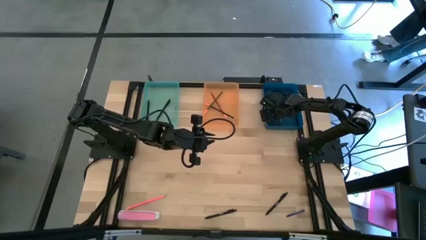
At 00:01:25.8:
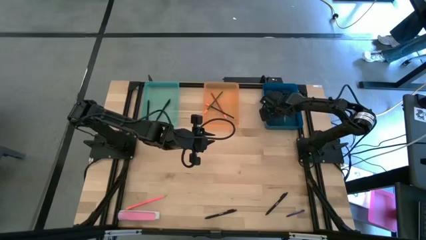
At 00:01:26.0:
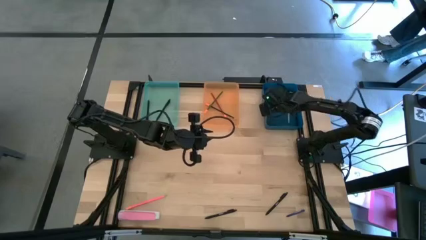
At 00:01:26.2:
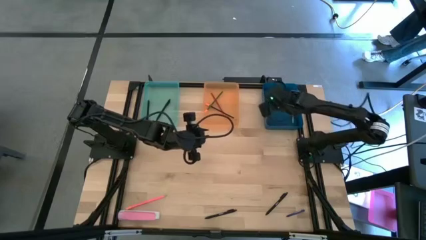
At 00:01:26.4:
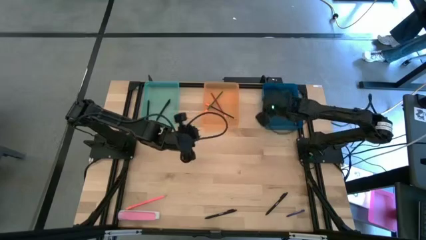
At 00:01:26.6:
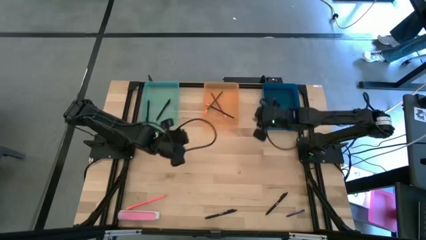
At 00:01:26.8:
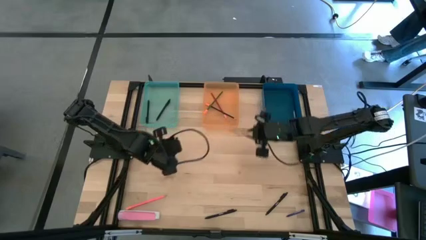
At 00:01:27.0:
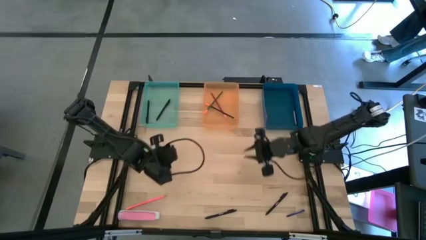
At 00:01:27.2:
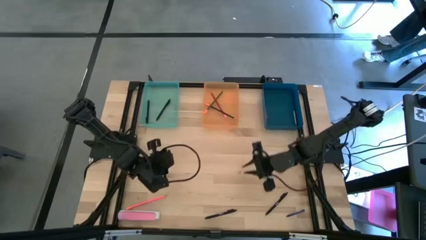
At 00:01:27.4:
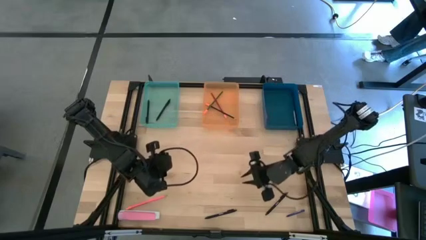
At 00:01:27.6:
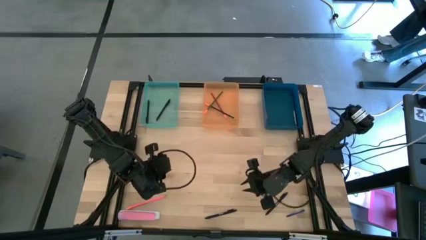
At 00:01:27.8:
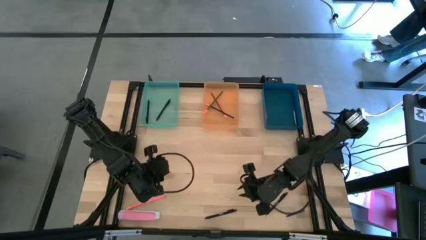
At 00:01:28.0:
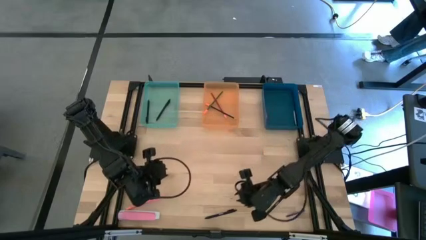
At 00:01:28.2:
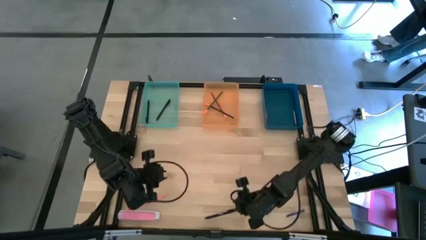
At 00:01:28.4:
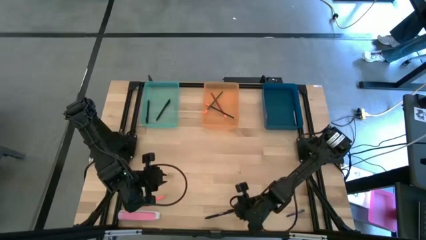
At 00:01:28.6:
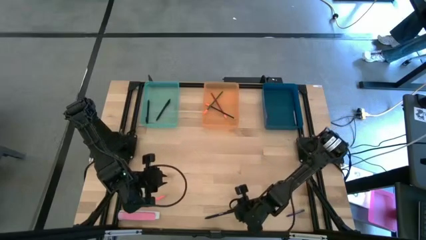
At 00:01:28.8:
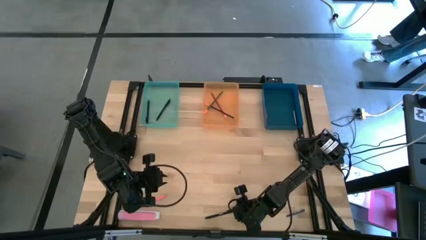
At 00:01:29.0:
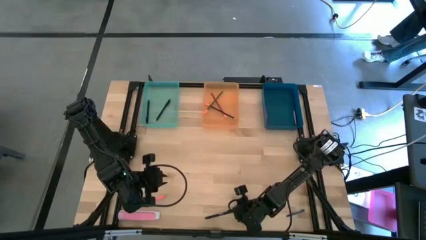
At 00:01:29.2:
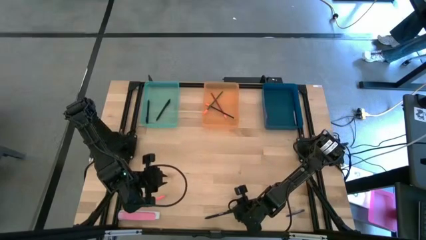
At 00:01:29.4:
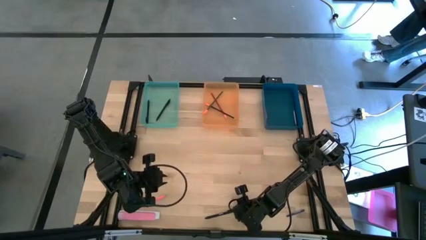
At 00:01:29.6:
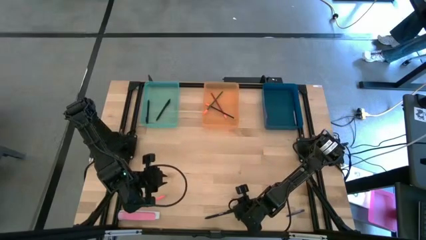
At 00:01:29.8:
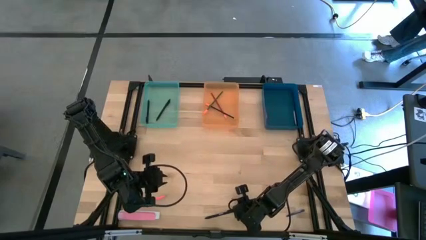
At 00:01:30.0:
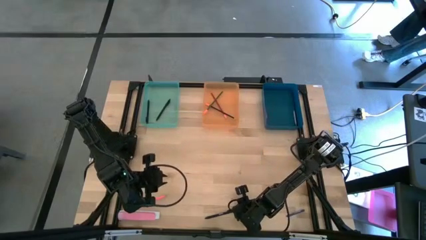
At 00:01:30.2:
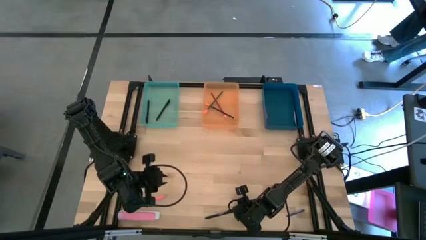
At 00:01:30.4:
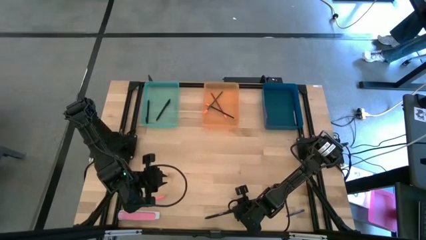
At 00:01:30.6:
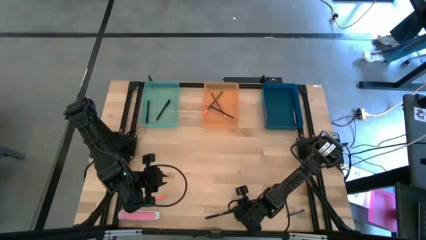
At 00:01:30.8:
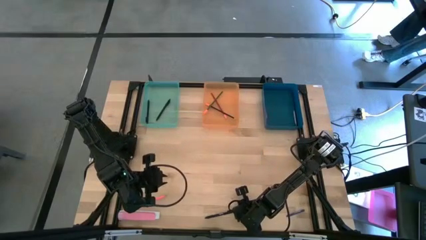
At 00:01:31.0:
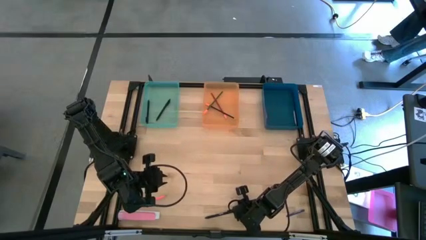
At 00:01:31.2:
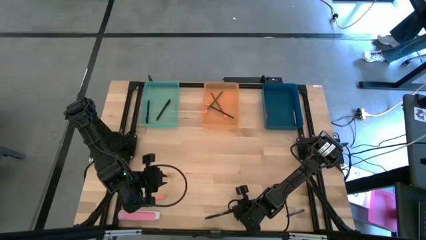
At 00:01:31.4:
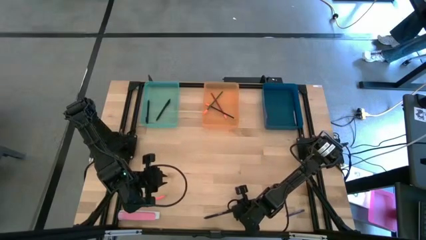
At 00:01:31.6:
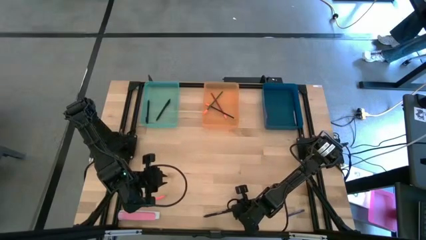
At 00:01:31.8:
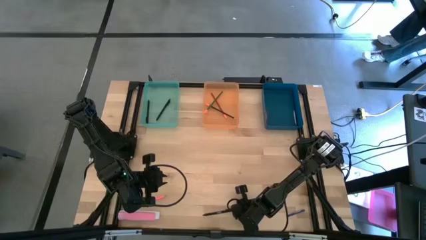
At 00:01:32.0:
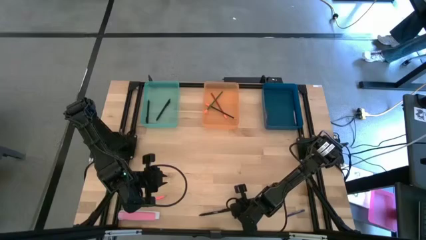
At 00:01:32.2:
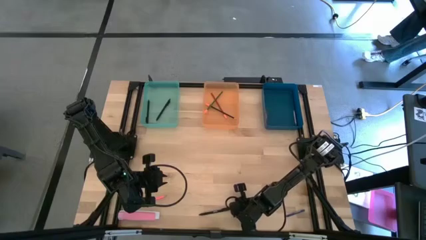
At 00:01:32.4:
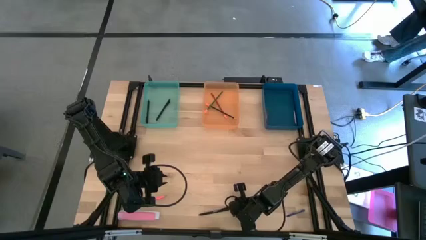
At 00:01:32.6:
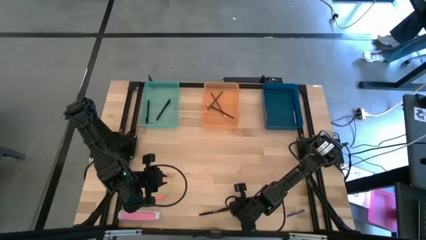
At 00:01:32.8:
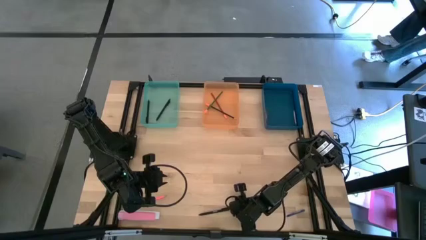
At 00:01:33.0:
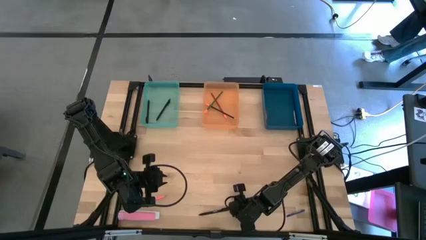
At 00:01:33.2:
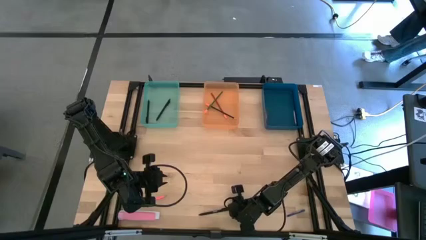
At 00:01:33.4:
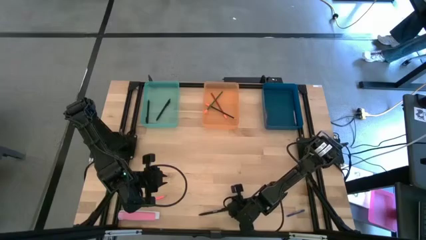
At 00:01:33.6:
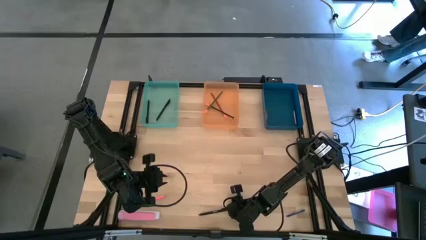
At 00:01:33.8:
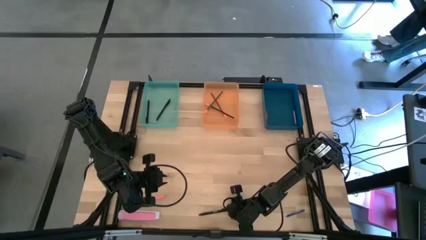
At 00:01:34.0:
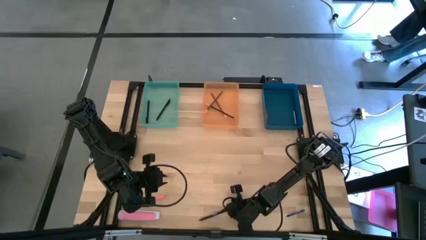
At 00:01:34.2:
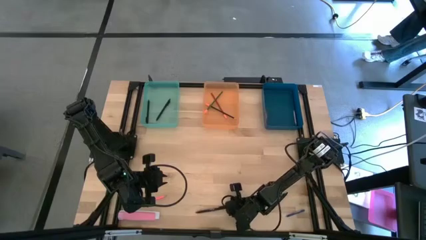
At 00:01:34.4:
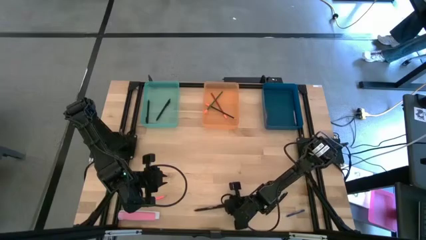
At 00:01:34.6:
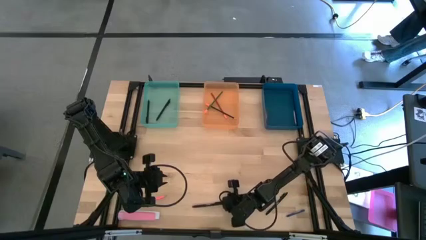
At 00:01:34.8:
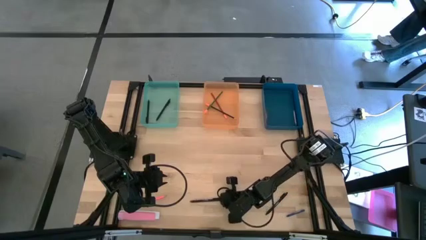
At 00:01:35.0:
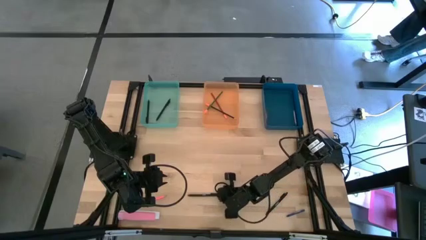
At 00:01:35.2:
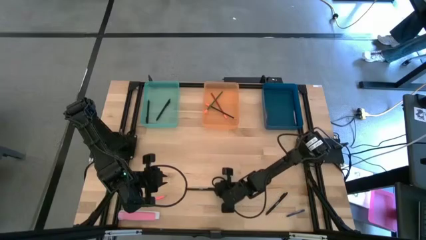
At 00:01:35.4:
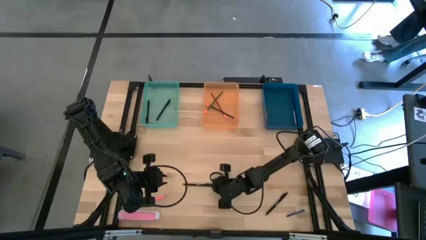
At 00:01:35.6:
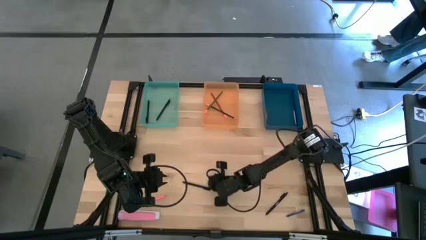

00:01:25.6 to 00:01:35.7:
Task: Sort crayons/erasers/pens/pencils in bins
Put the black pen into the green bin

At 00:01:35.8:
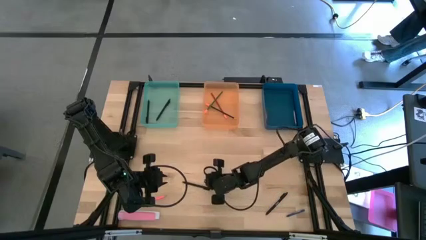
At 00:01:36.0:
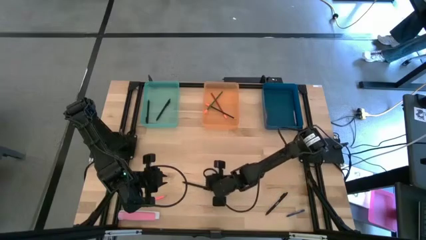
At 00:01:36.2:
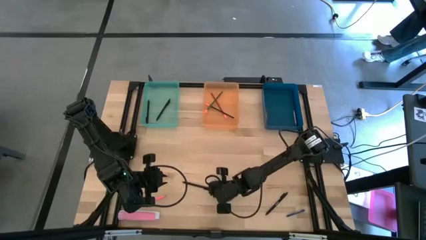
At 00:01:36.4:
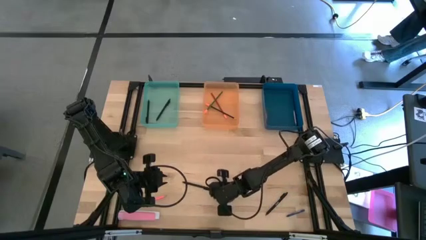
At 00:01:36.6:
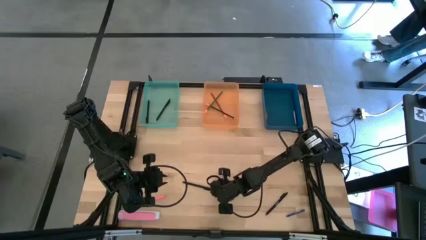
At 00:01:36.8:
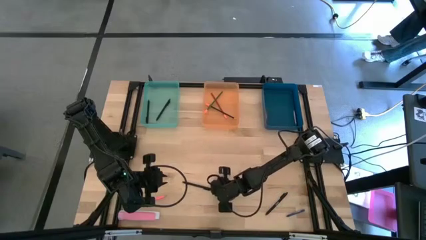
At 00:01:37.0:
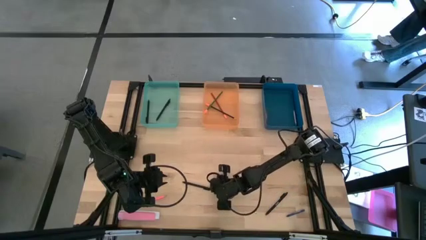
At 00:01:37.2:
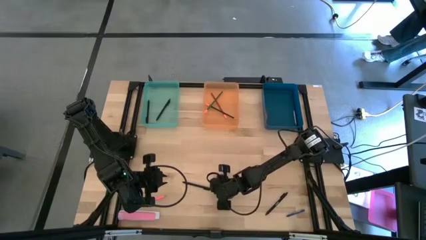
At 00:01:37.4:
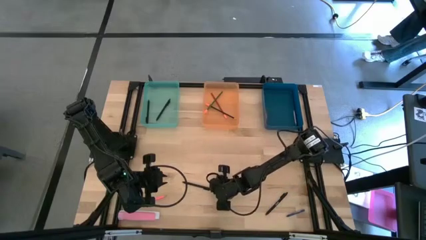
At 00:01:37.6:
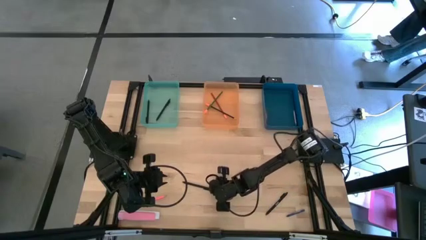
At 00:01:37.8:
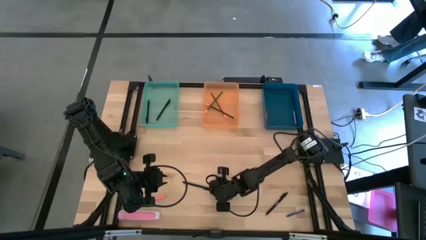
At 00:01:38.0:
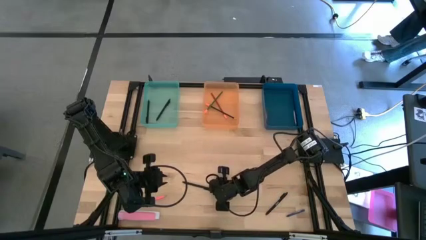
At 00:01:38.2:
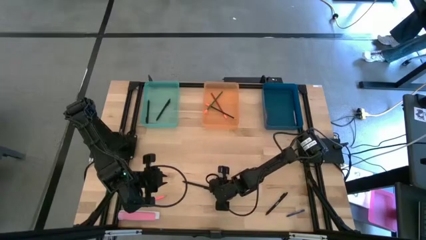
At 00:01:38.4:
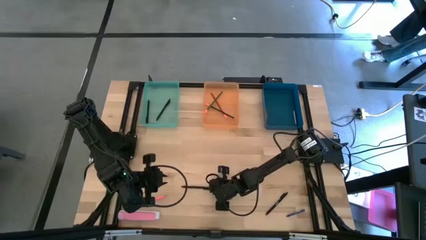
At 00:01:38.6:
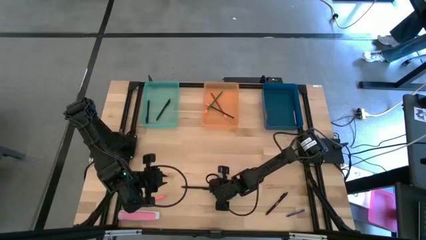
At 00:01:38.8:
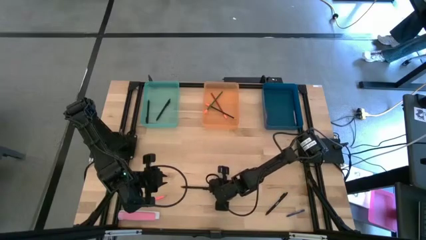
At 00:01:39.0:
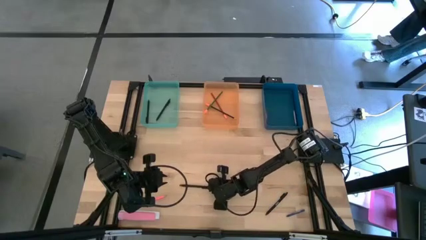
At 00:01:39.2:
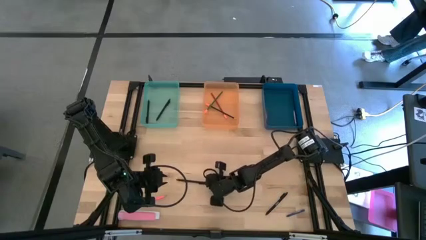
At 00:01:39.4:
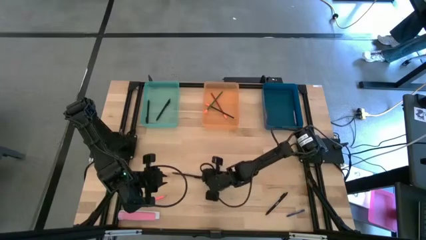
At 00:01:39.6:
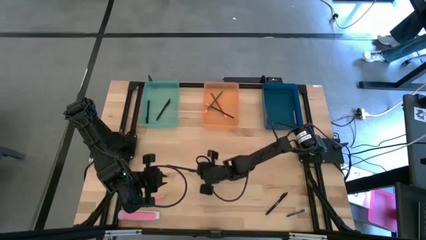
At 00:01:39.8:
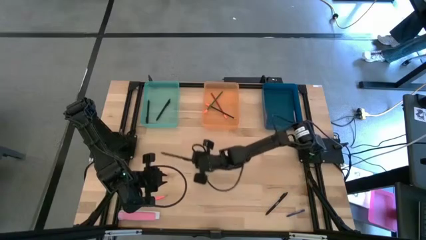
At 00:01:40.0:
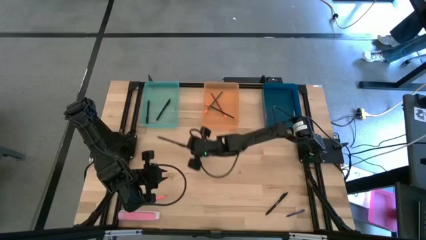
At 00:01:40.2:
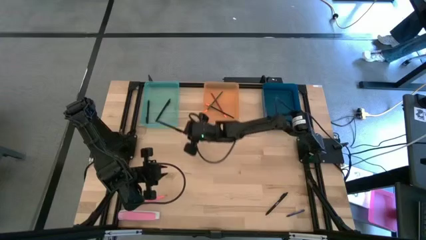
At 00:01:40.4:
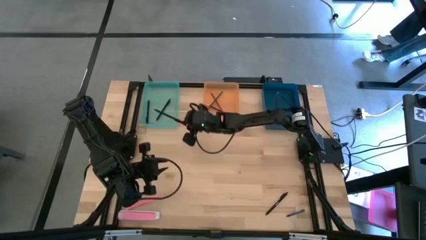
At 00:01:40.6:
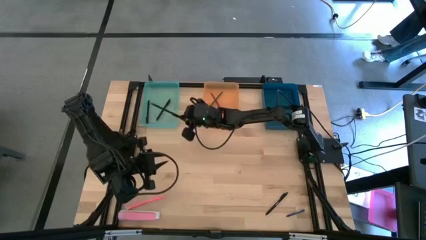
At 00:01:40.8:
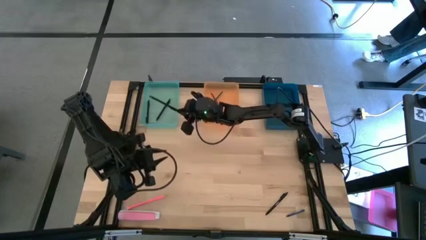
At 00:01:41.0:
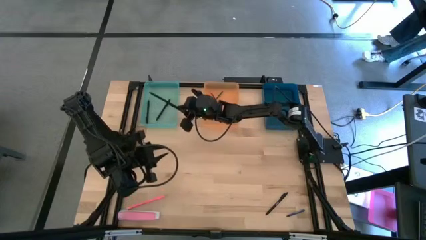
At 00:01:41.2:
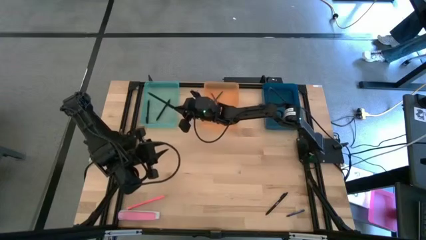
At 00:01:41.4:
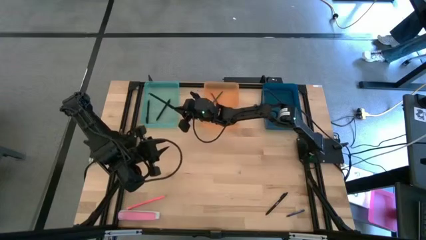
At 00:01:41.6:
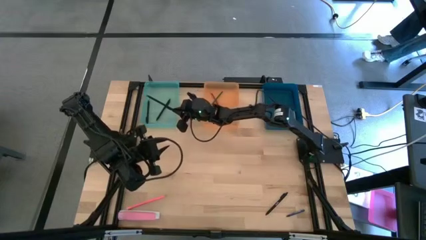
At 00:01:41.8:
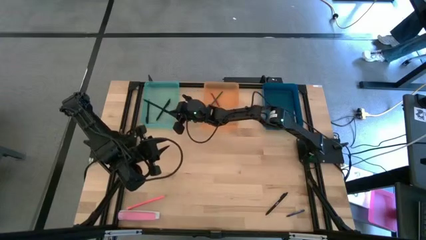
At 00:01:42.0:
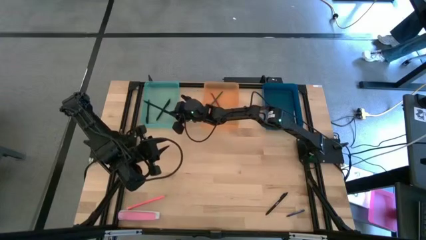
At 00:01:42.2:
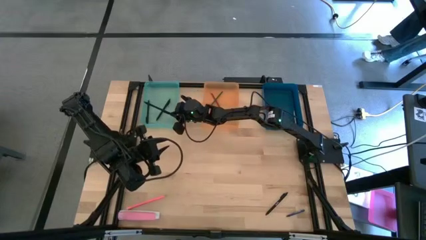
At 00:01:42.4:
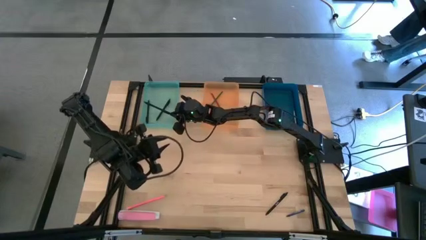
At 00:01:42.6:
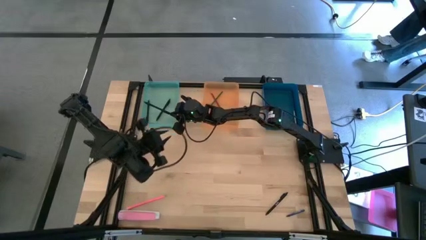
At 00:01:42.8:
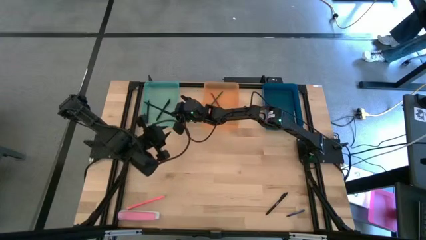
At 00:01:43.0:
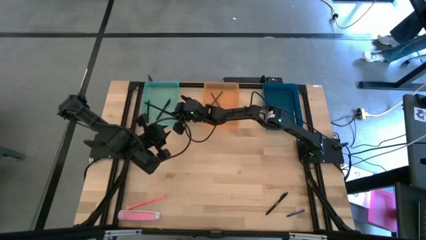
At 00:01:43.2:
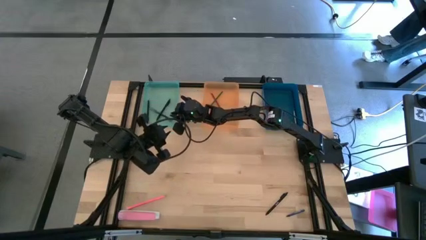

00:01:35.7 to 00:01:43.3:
Put the black pen into the green bin
